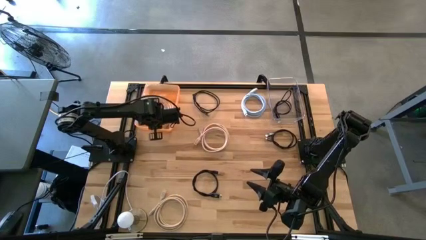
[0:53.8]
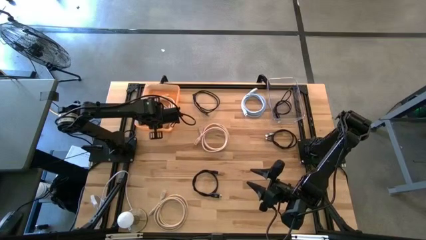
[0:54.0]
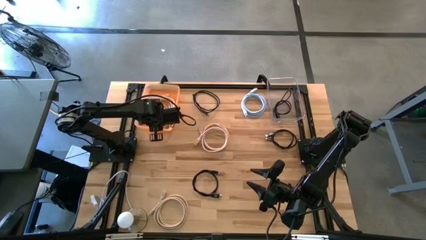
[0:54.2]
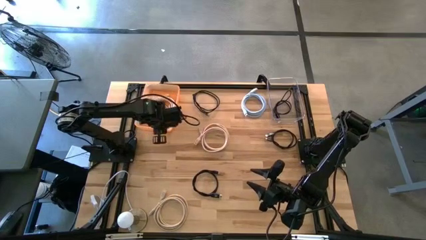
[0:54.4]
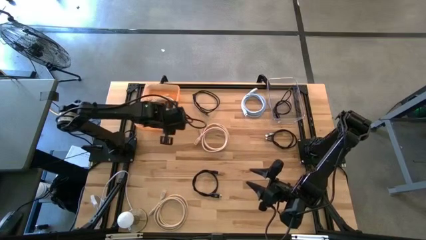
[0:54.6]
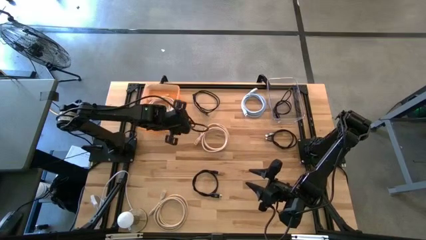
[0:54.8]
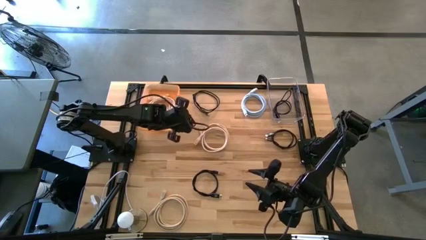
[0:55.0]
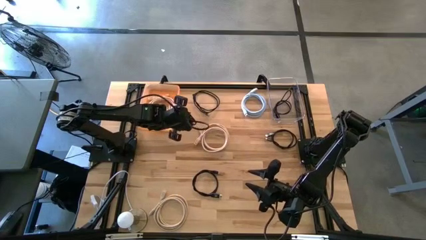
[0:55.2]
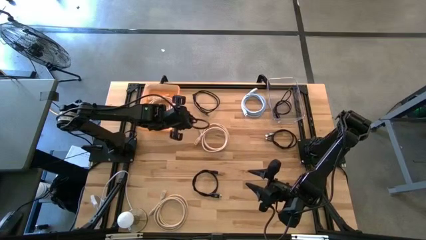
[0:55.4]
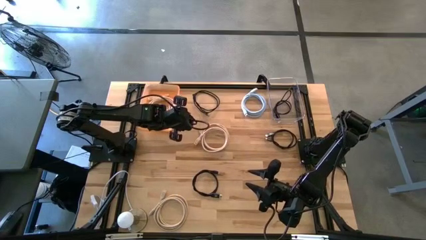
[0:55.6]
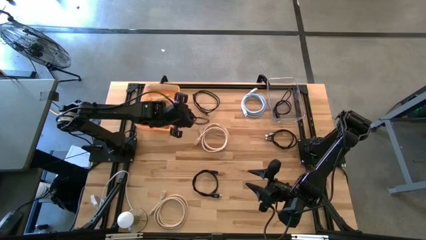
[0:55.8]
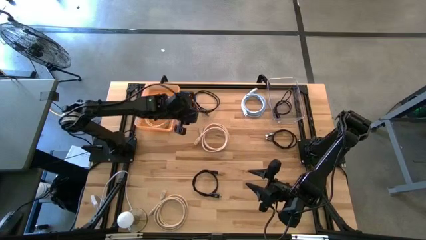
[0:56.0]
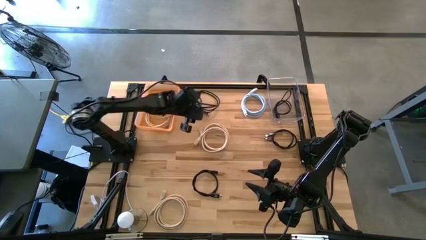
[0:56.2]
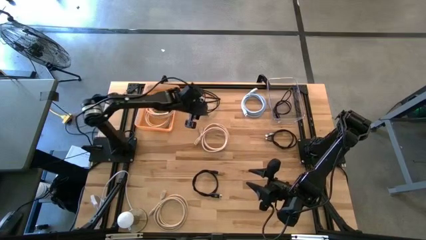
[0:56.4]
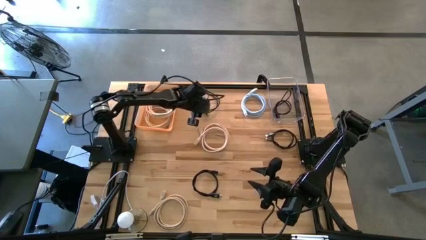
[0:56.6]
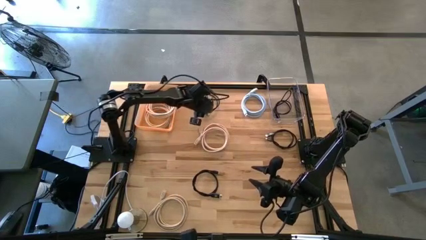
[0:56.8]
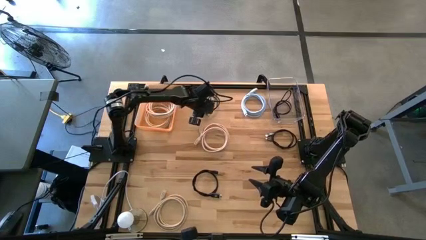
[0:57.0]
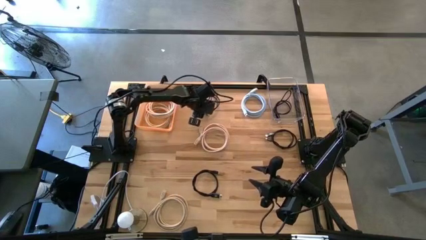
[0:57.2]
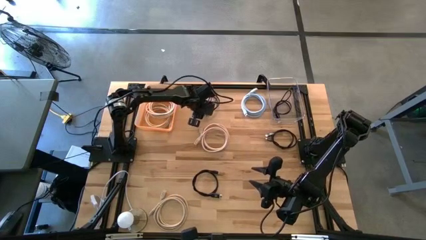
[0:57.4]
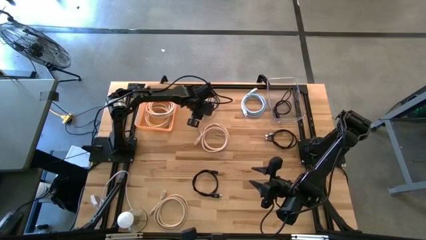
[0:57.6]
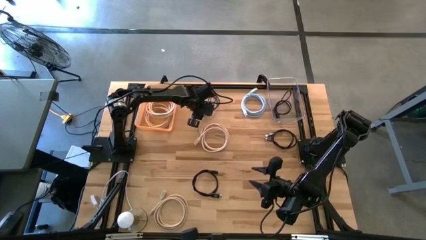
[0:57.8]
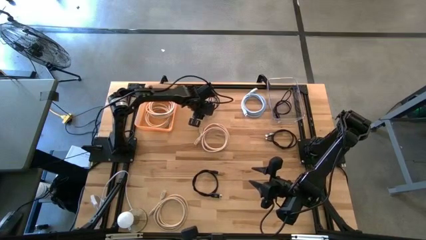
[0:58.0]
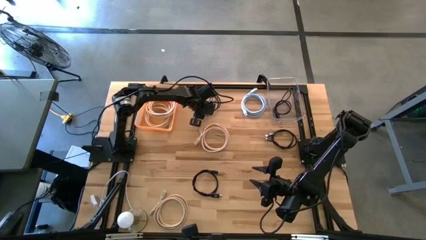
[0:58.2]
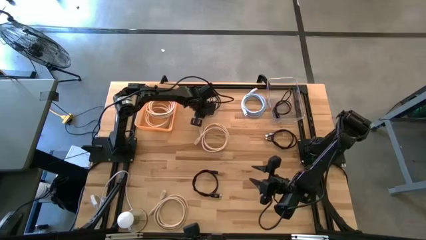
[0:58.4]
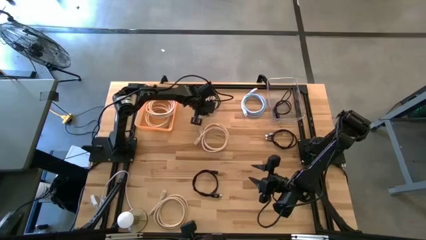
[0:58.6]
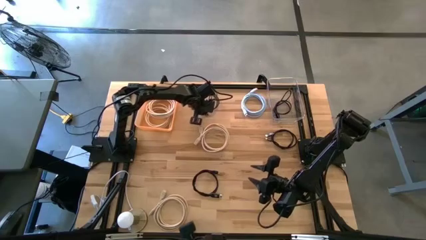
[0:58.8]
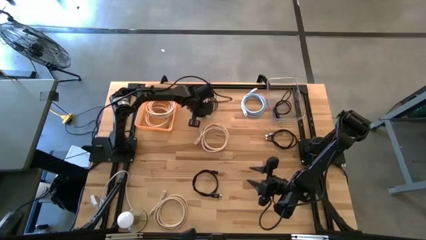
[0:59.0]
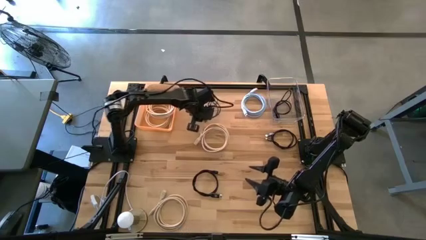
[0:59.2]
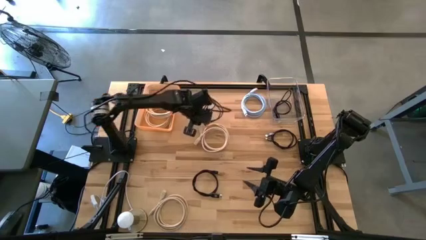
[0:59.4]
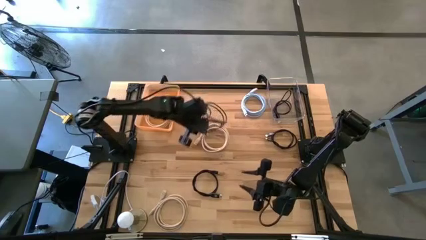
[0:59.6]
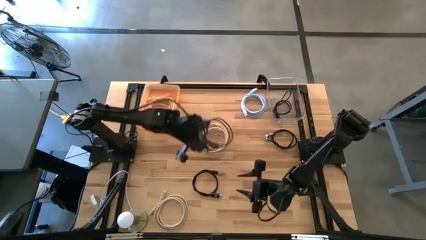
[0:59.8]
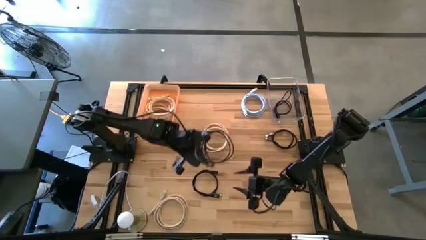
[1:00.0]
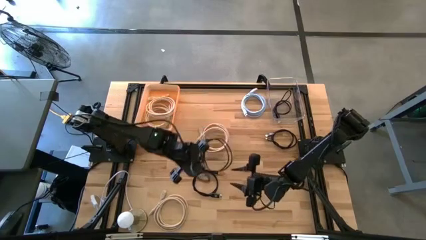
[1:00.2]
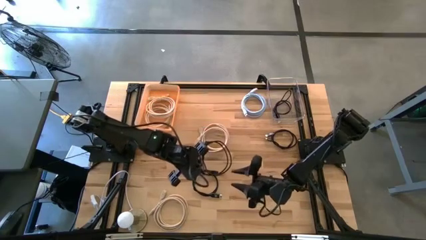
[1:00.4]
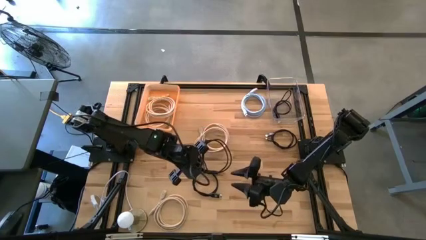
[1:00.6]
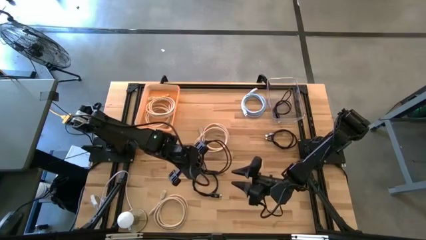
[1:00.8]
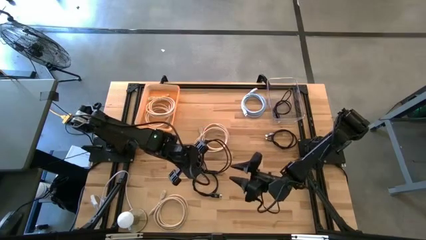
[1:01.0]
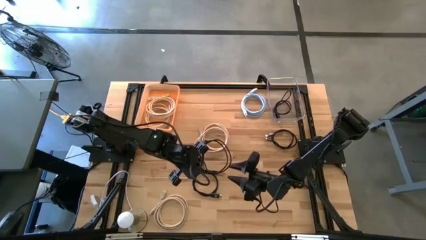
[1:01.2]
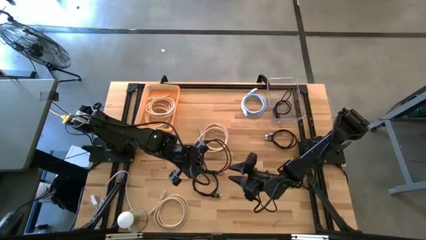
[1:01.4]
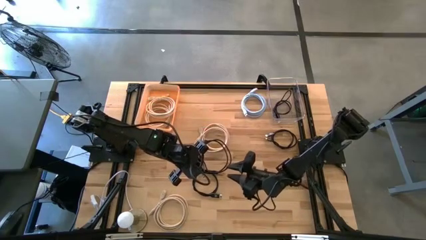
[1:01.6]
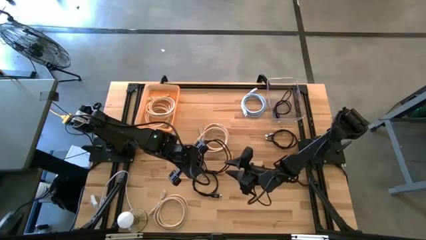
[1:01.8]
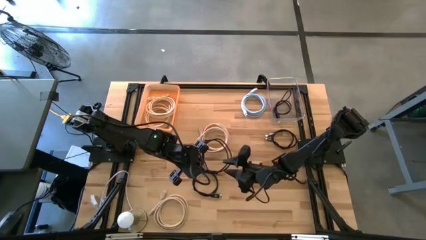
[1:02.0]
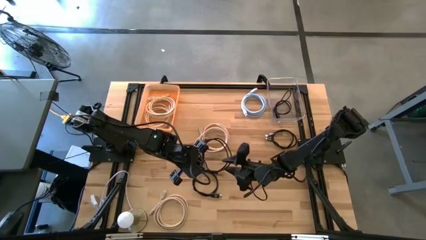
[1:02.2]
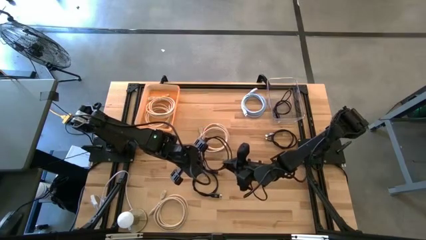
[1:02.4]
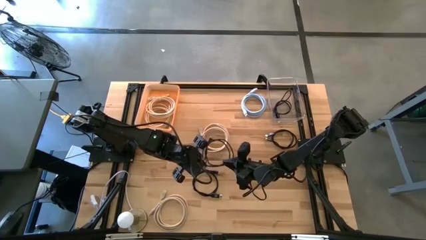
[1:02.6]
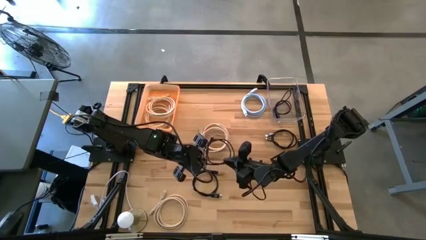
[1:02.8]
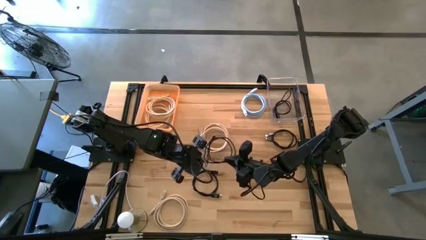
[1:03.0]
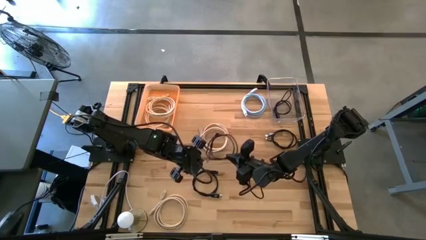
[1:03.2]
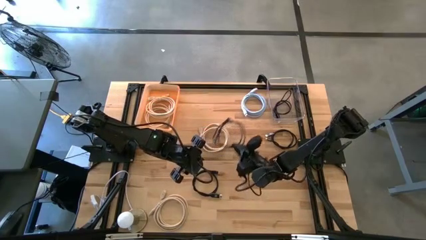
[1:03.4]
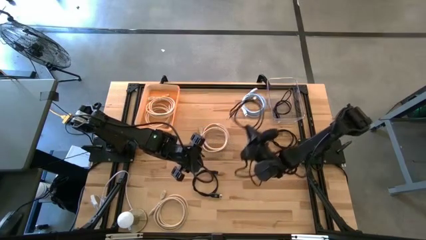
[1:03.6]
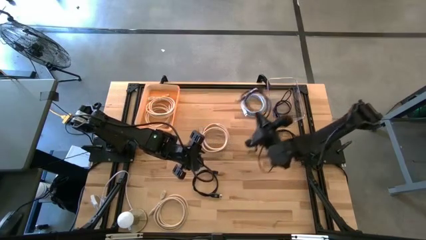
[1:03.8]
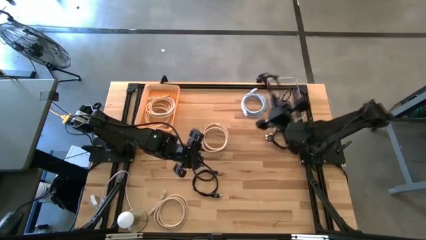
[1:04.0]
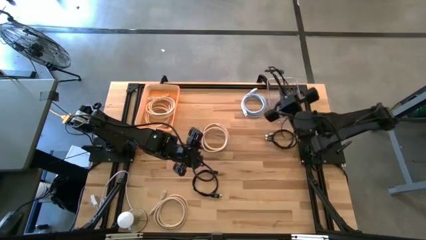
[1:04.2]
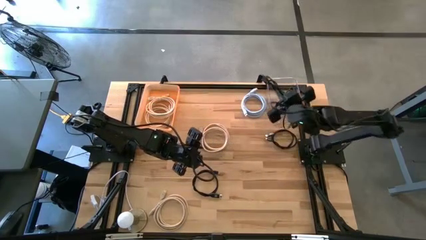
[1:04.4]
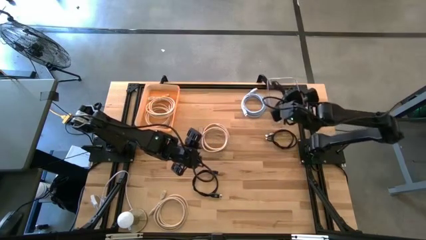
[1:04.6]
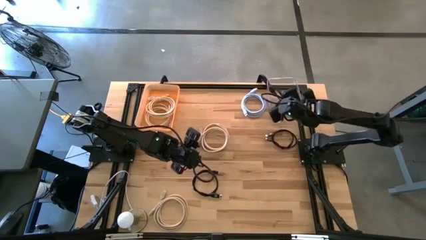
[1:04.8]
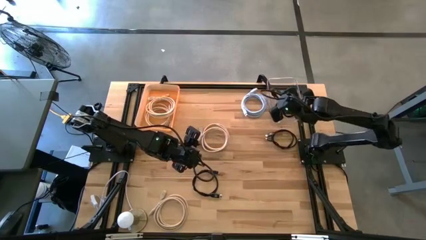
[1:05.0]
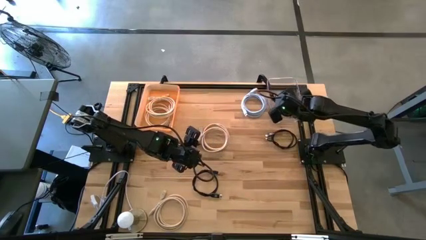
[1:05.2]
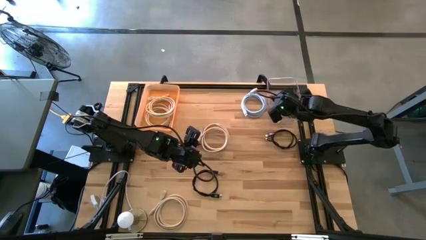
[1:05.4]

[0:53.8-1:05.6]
Task: Sort HDMI cables
Put the black HDMI cable into the transparent bin

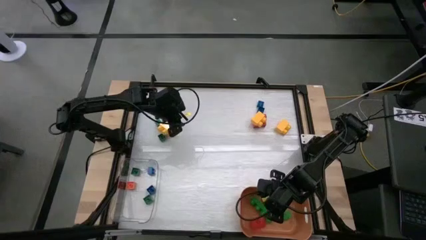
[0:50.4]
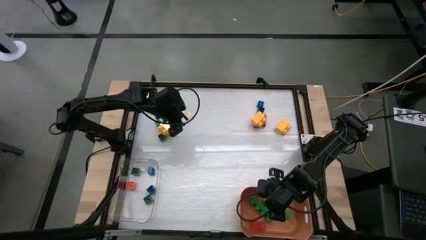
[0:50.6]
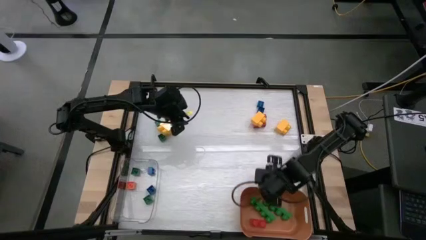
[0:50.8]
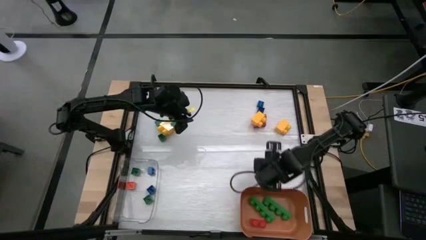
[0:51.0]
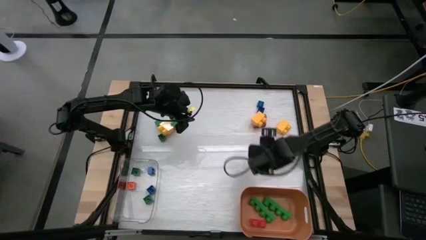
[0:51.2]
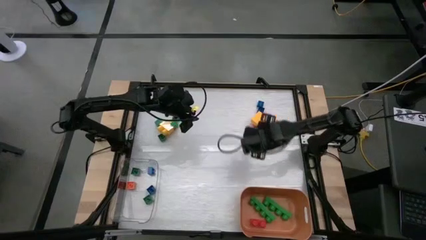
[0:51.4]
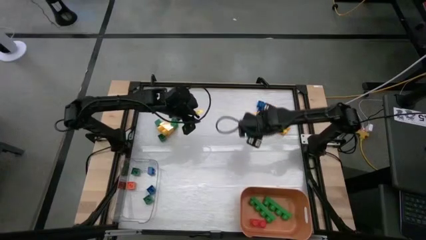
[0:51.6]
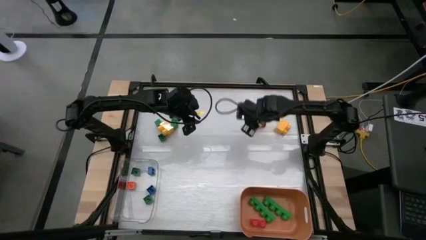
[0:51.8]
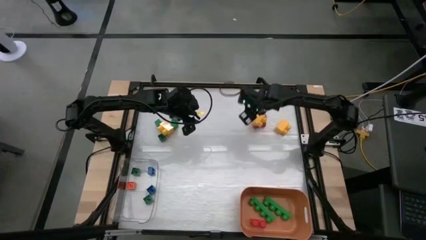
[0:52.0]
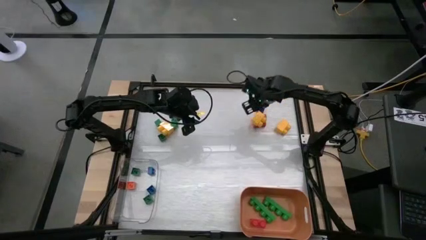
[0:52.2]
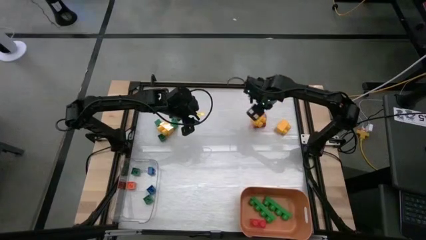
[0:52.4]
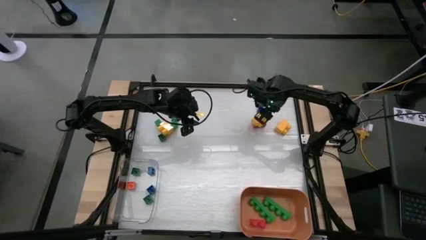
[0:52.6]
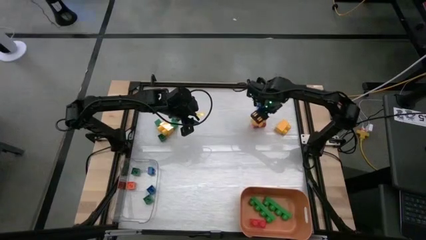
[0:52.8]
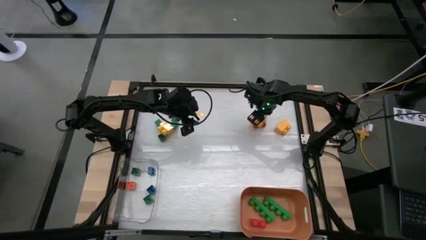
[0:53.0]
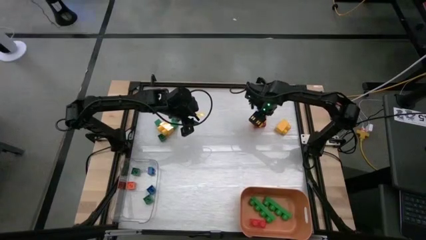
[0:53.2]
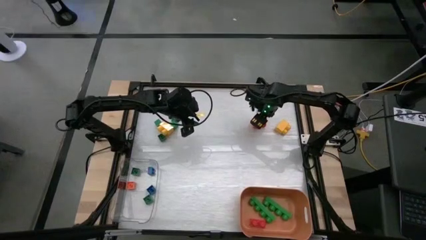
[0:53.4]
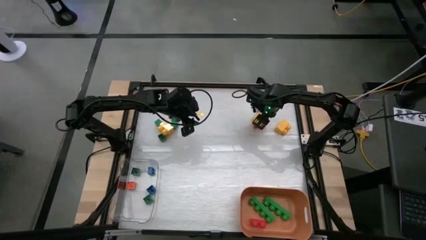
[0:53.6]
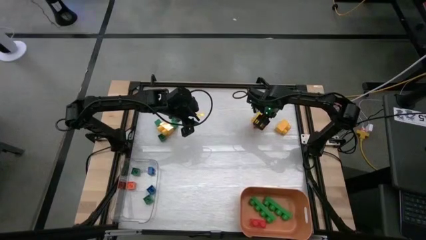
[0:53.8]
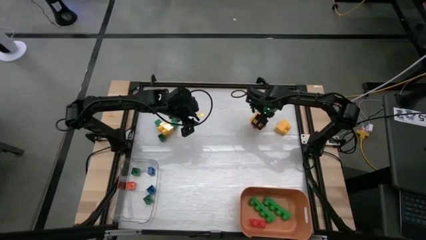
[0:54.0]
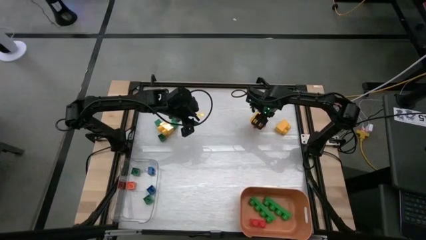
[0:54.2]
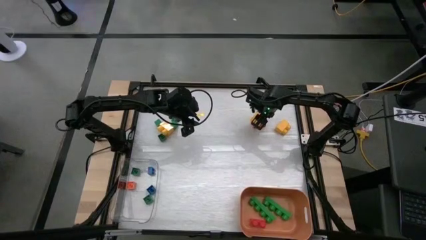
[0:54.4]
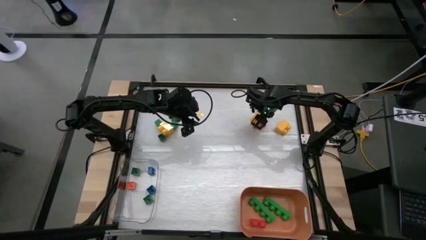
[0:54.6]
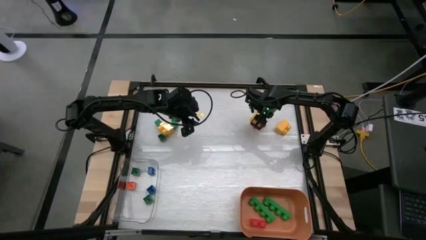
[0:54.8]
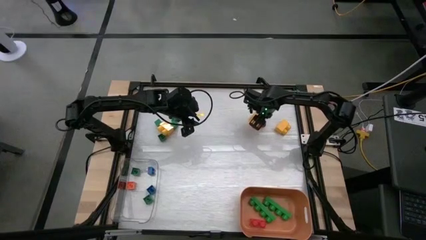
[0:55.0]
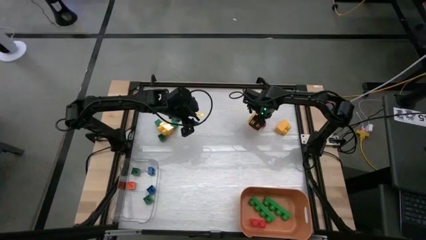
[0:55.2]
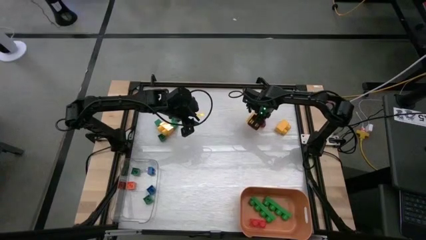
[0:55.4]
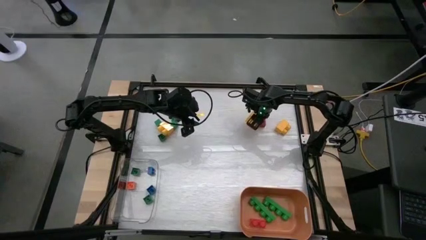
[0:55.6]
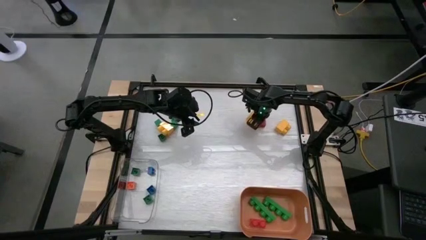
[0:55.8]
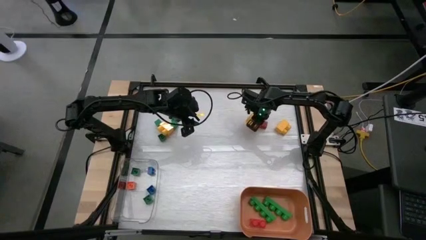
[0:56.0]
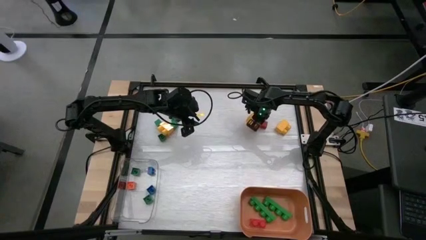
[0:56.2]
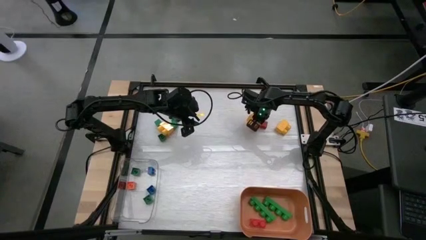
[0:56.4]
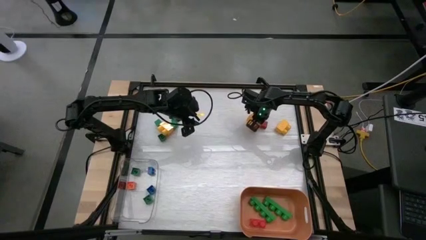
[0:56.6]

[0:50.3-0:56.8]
Task: Sort blocks by size
Put the big yellow game piece into the orange bin
